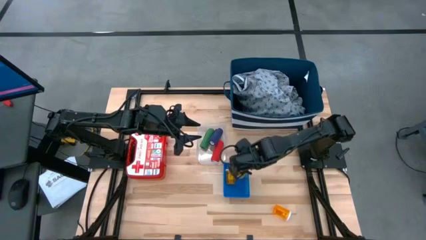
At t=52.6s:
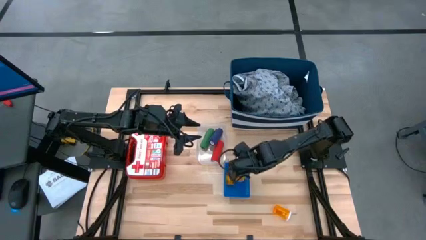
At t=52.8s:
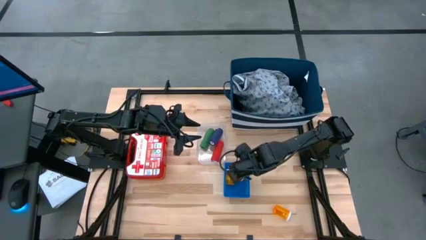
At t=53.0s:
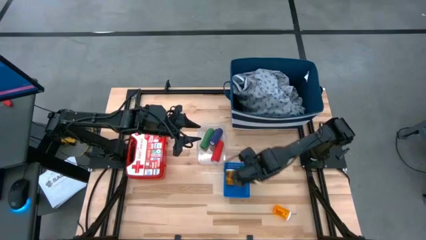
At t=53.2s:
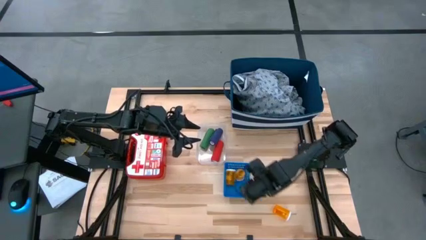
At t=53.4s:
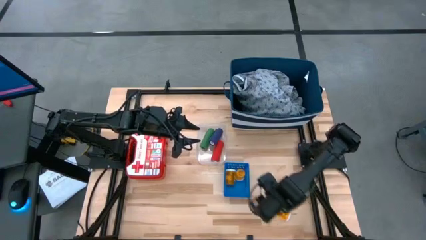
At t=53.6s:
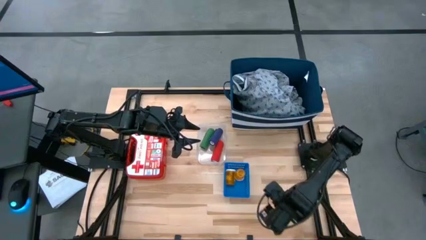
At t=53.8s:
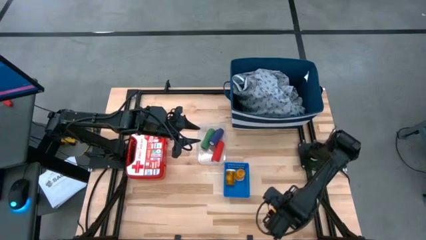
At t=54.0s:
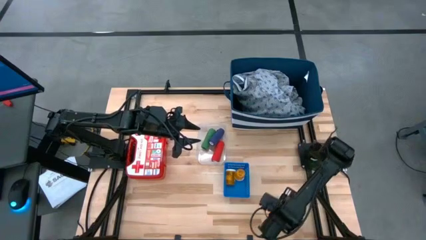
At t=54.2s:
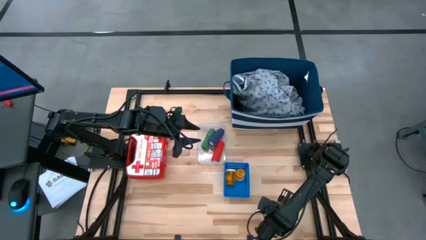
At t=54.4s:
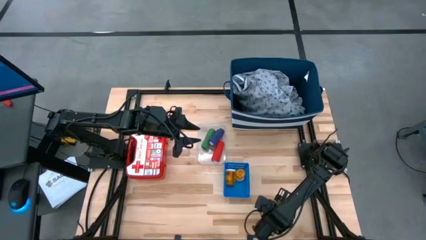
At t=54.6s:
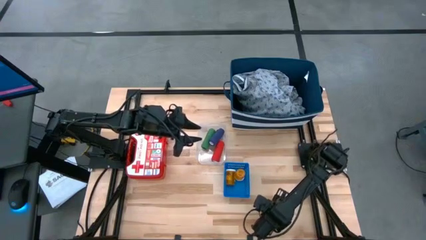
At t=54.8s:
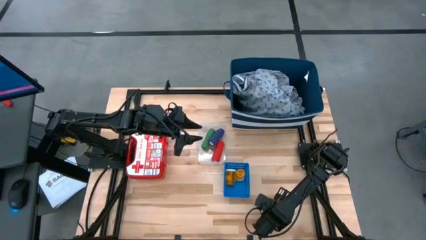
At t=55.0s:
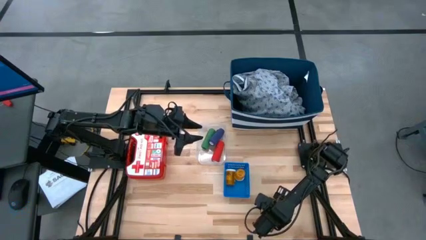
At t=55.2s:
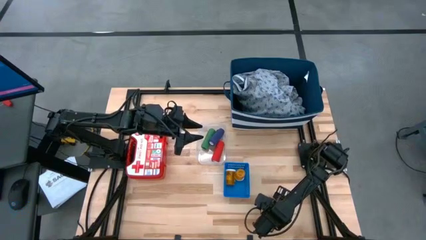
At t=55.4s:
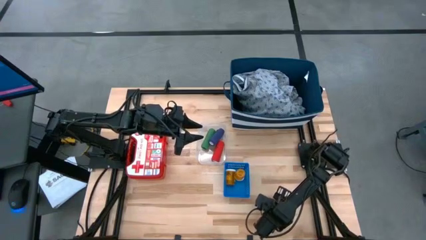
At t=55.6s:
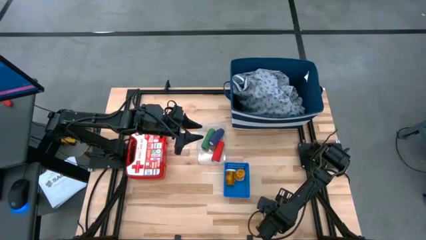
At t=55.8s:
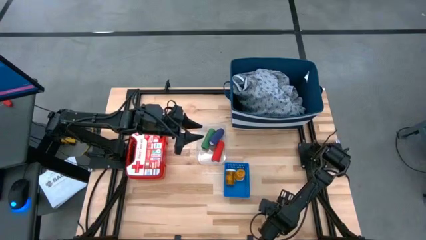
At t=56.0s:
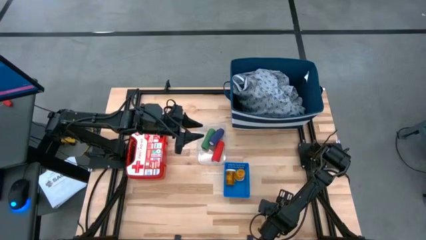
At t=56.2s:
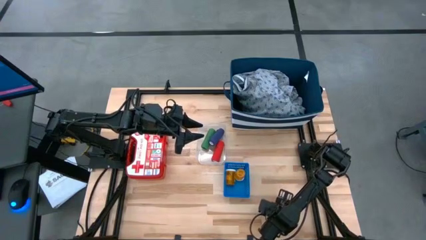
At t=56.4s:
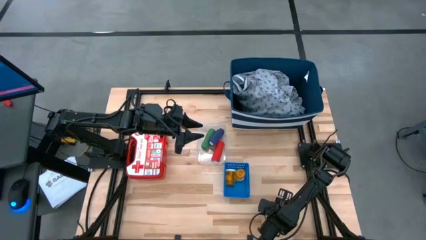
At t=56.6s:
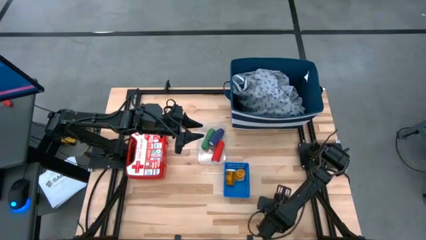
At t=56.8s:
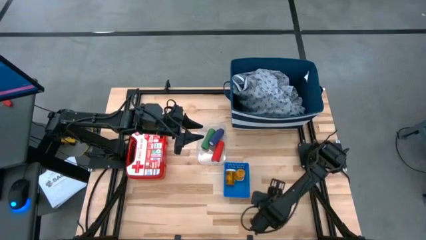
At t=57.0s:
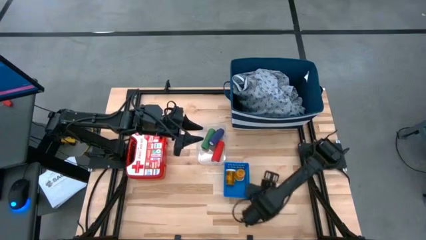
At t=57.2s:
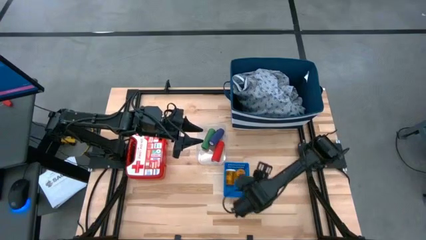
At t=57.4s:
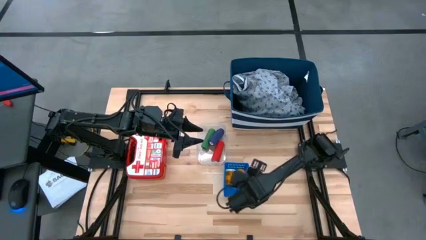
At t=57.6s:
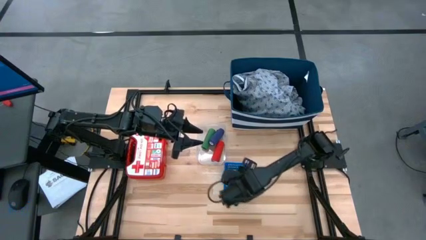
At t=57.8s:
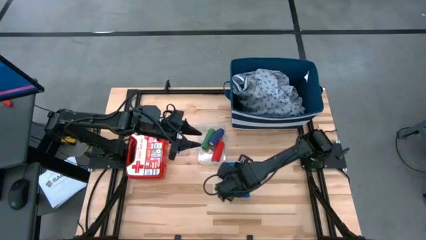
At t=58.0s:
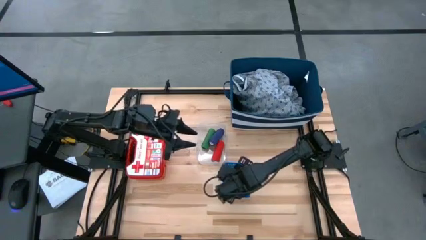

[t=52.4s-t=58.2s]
Task: Pick & Place Medicine items
Put the orange pill bottle into the blue bin

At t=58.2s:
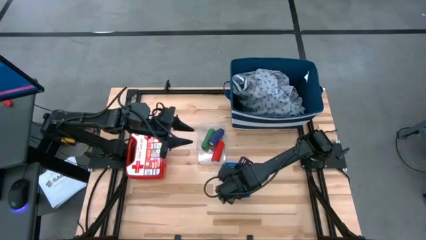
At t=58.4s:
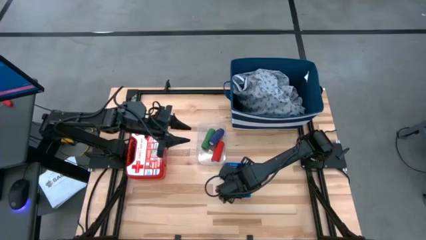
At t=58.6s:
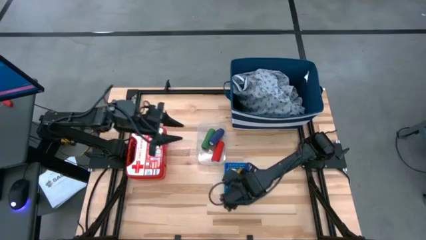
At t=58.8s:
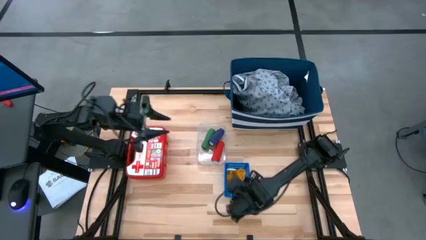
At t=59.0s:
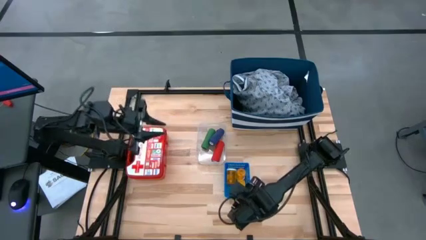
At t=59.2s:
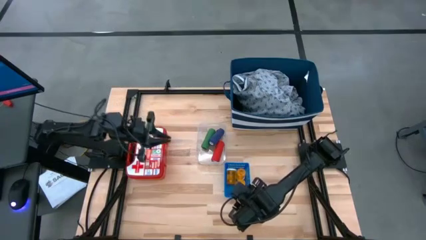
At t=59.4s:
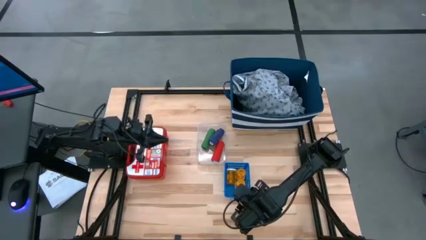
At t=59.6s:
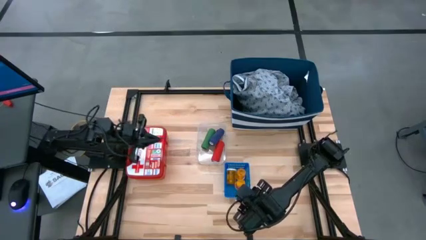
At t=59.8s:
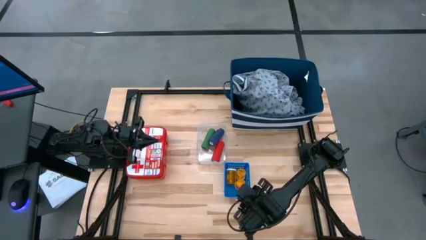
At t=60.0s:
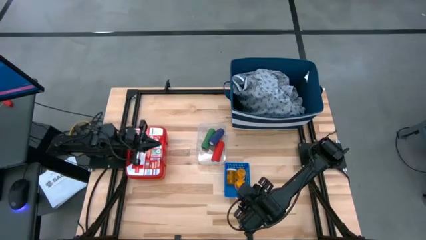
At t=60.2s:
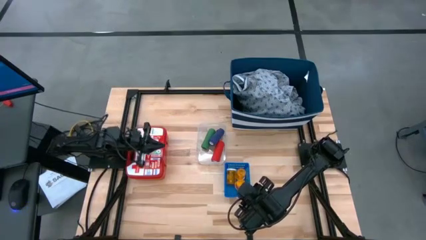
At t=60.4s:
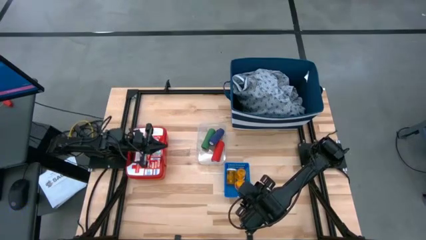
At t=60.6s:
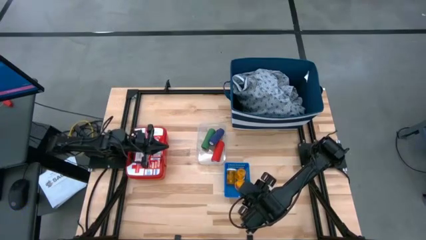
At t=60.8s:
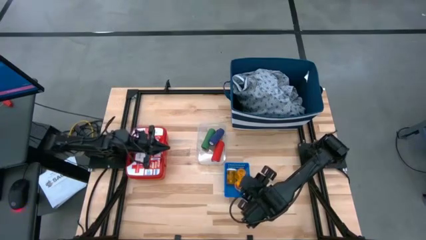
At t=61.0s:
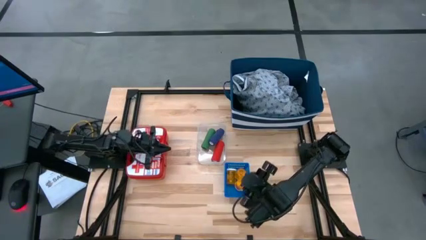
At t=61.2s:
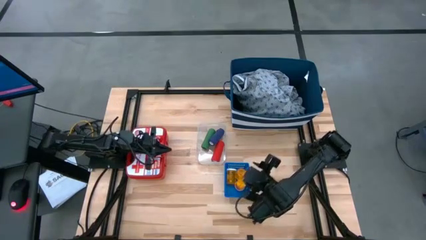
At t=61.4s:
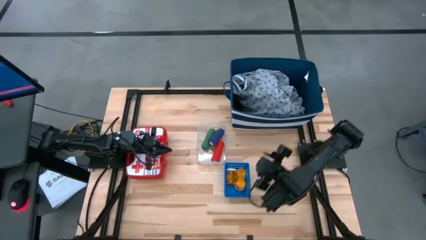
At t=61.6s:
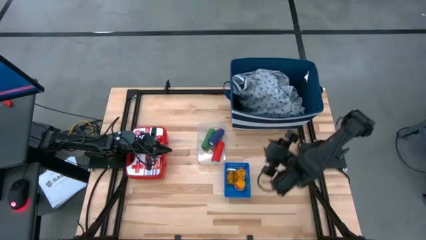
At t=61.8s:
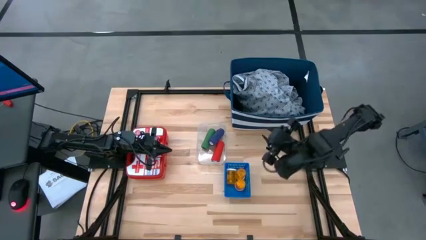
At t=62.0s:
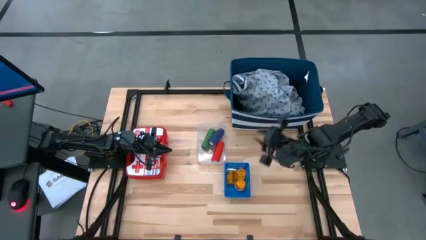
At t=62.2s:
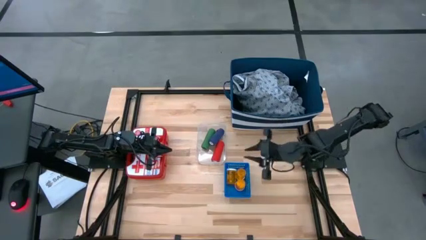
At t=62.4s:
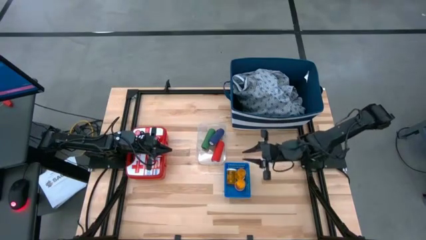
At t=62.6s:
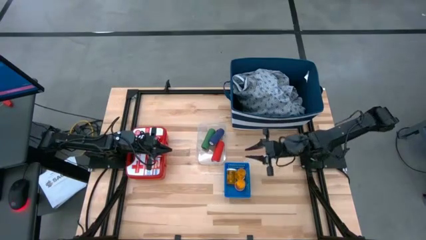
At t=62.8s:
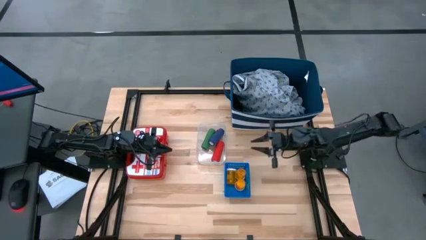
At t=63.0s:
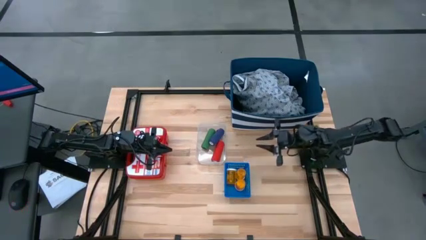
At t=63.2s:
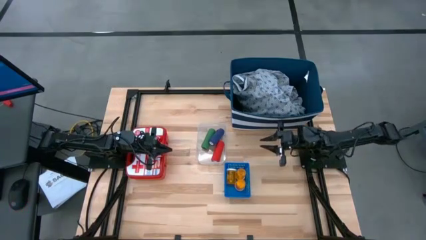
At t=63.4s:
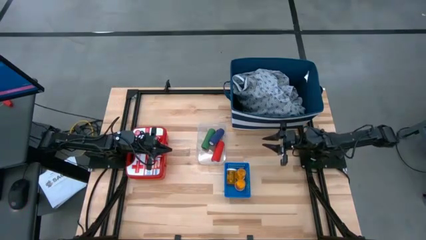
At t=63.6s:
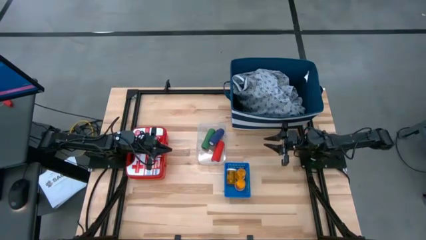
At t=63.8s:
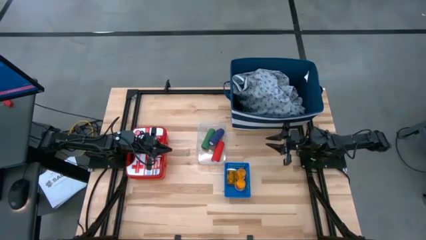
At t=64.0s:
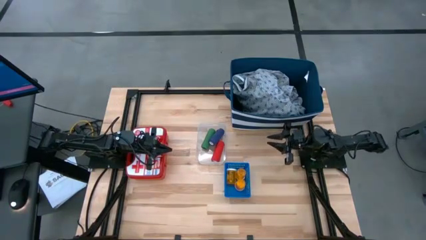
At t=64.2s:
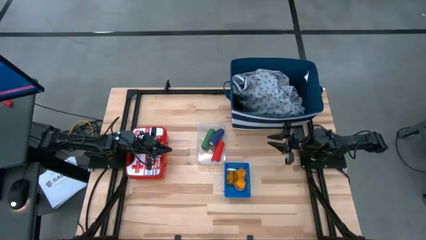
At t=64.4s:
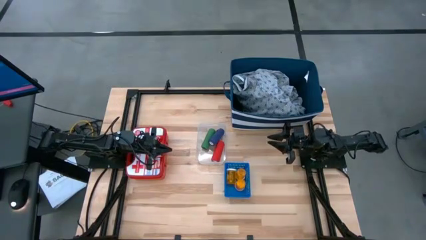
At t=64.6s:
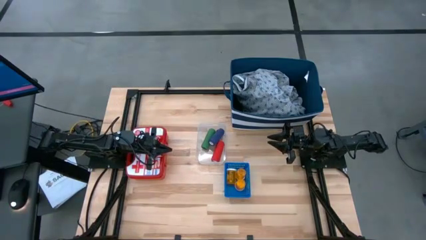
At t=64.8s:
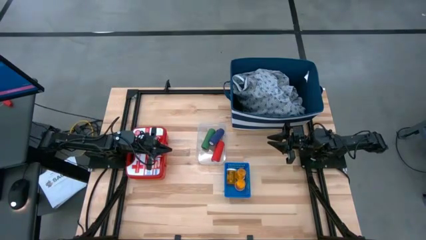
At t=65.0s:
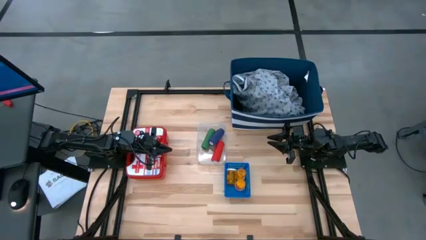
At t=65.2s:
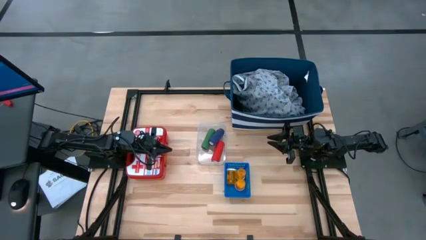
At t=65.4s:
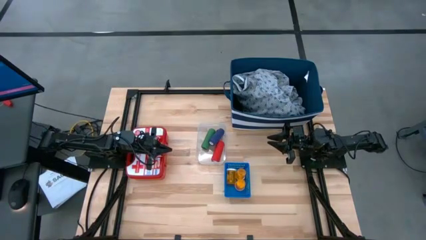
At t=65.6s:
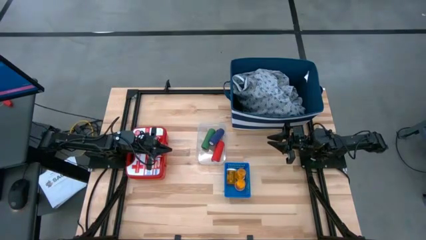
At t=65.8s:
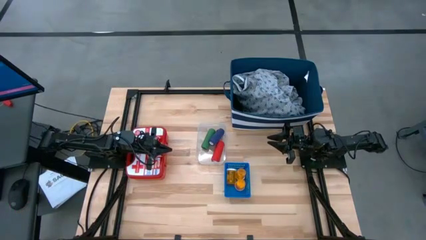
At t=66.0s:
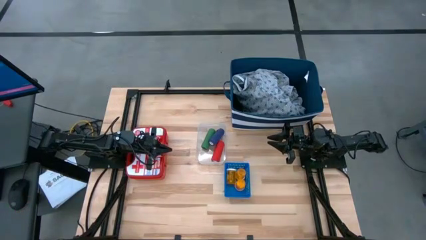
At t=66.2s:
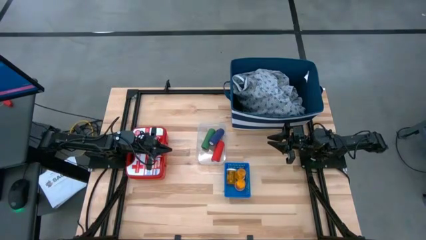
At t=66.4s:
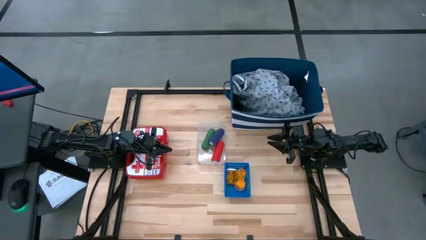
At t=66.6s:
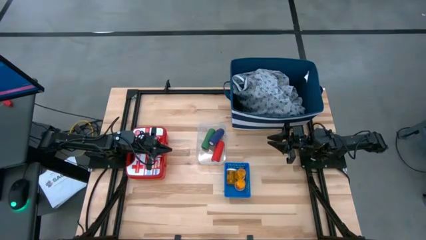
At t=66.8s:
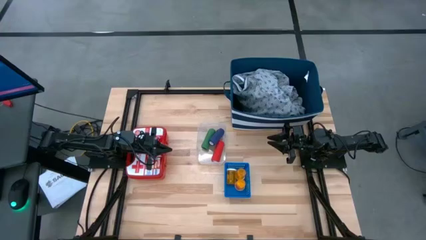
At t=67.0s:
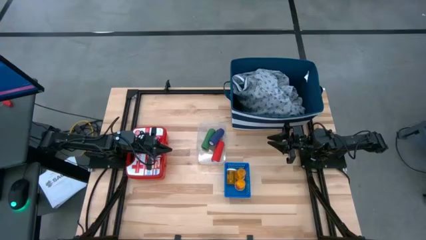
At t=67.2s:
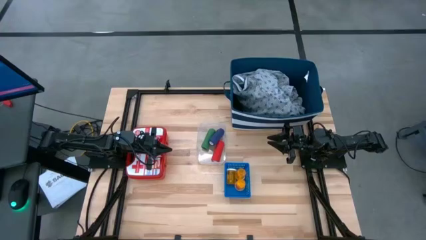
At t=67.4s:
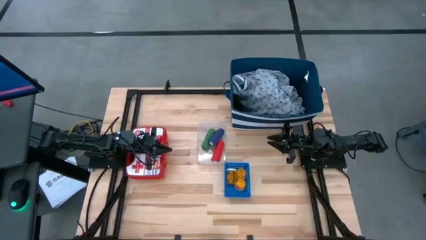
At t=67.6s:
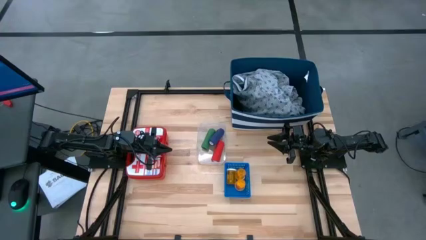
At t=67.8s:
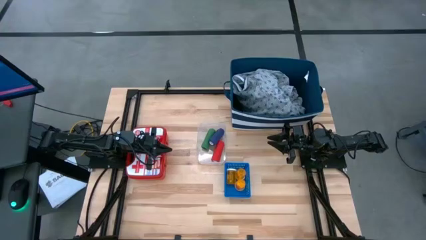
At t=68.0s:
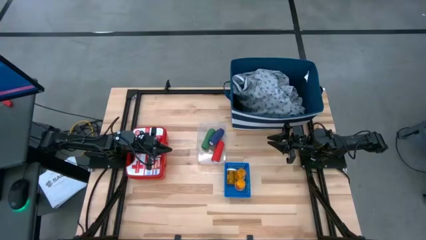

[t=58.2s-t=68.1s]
Return to home position
